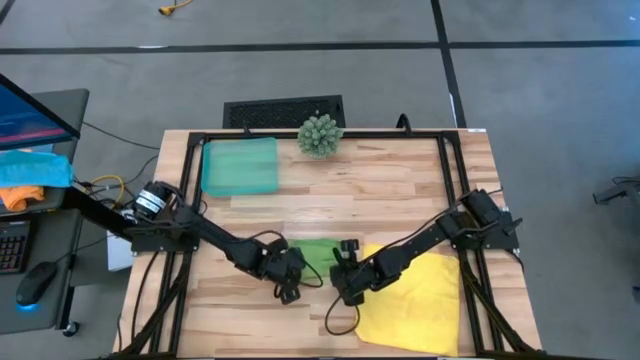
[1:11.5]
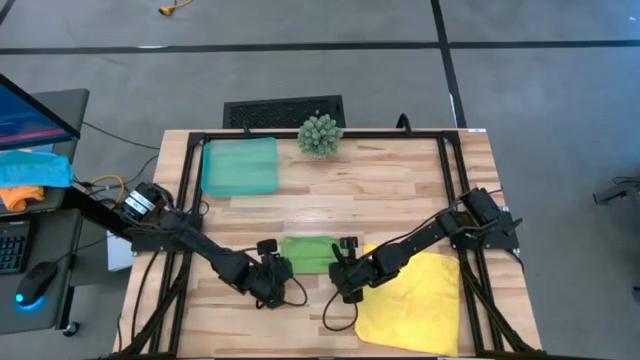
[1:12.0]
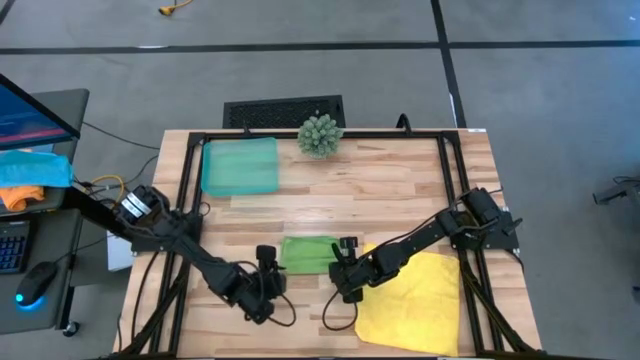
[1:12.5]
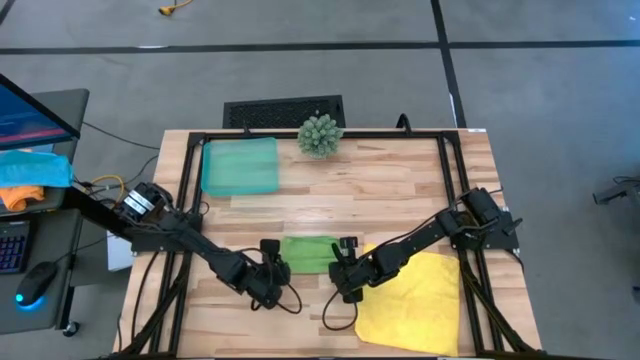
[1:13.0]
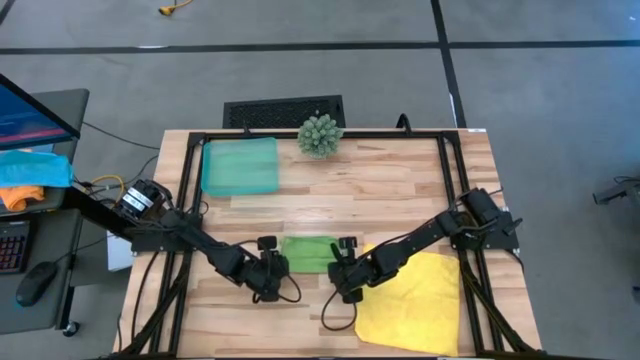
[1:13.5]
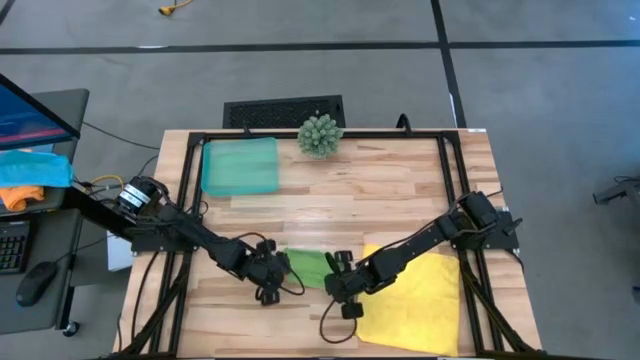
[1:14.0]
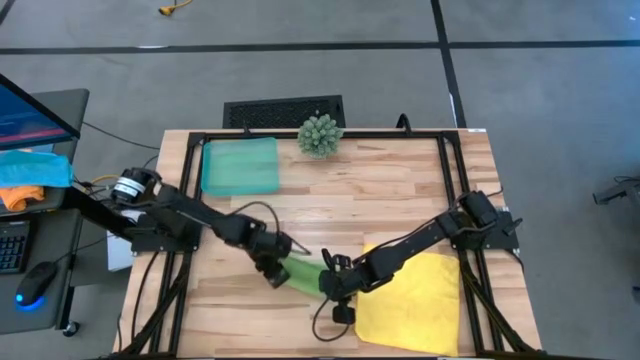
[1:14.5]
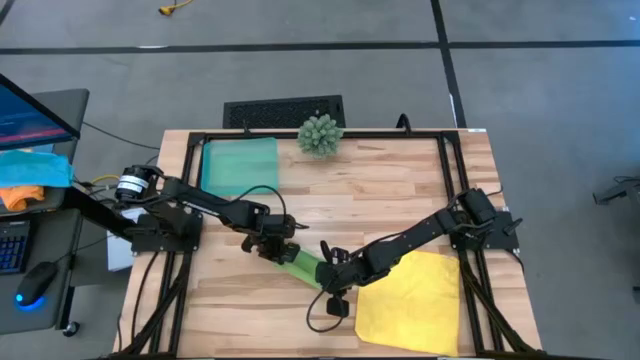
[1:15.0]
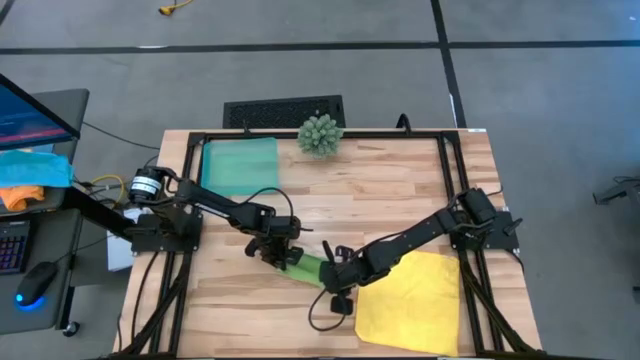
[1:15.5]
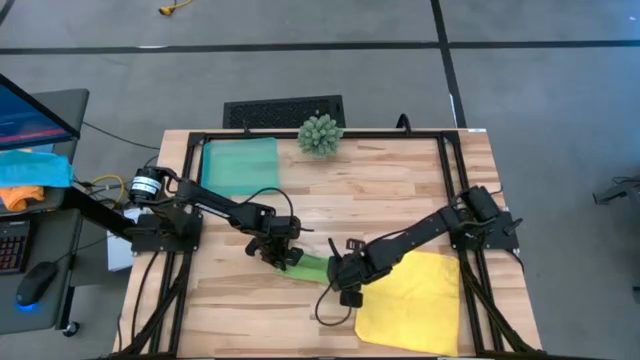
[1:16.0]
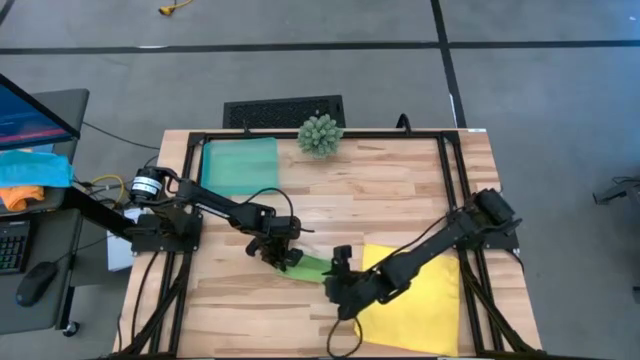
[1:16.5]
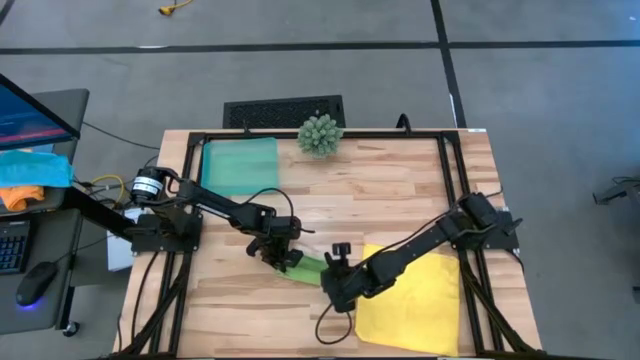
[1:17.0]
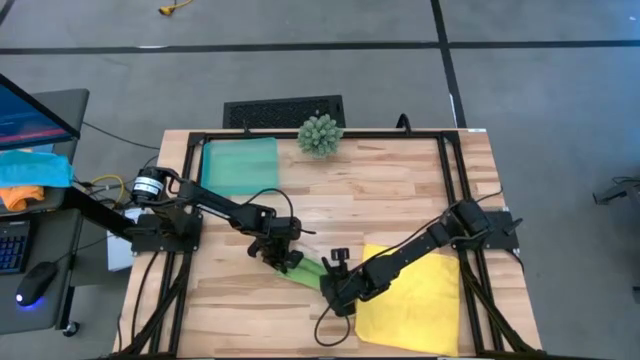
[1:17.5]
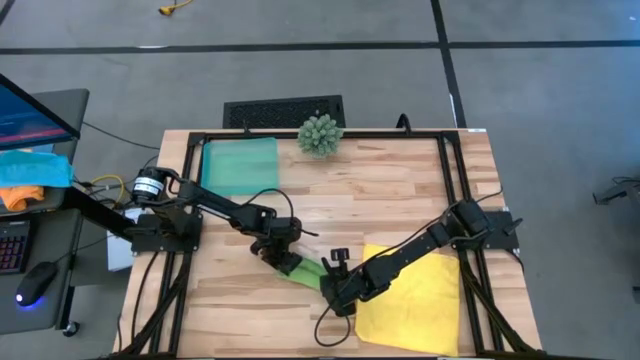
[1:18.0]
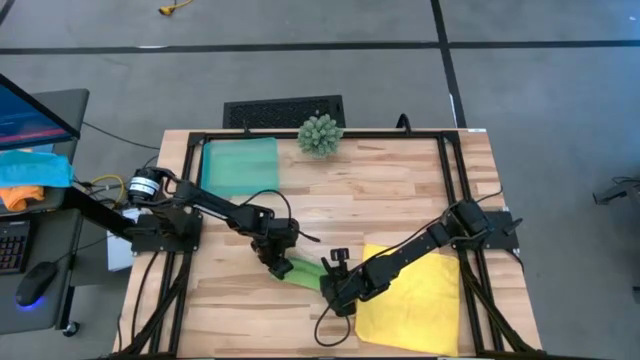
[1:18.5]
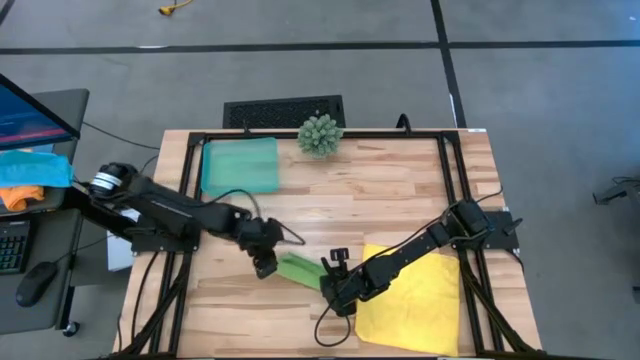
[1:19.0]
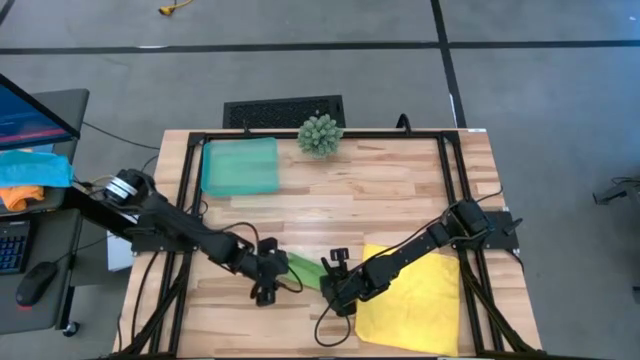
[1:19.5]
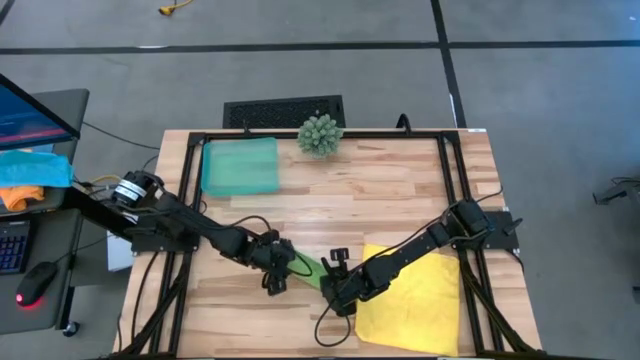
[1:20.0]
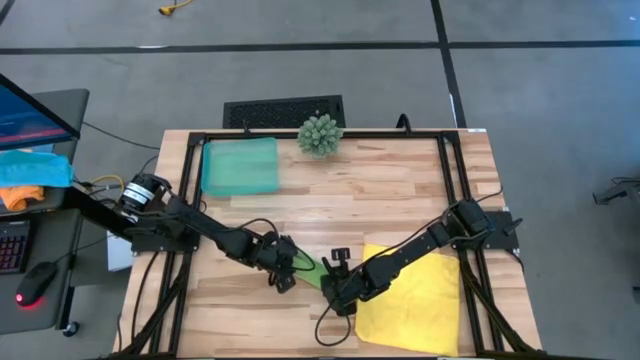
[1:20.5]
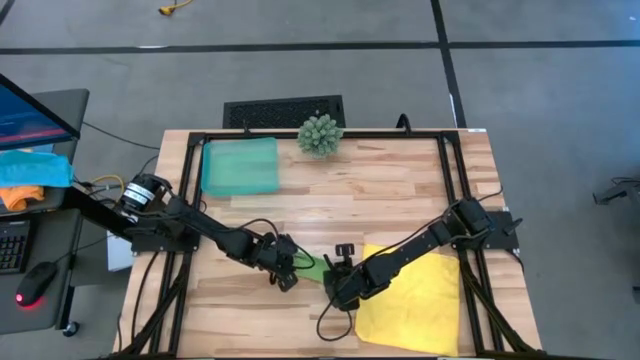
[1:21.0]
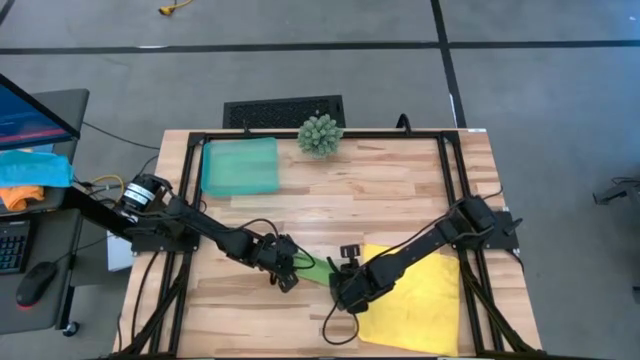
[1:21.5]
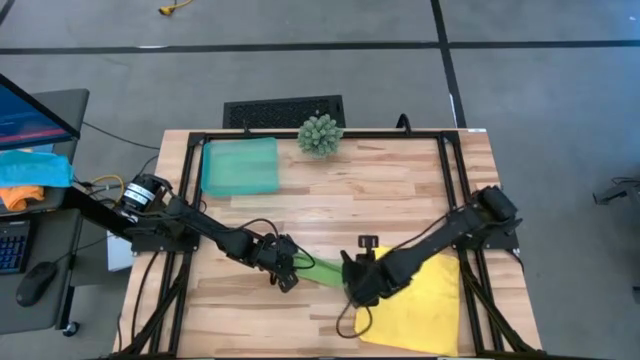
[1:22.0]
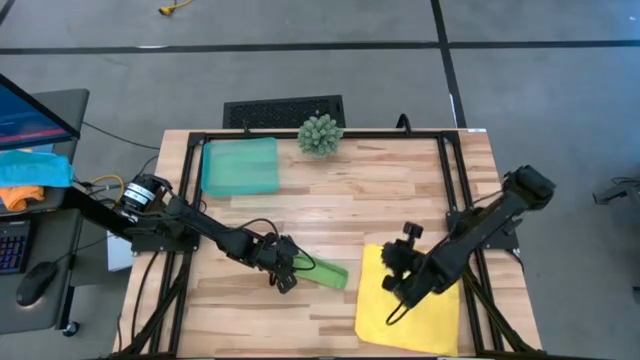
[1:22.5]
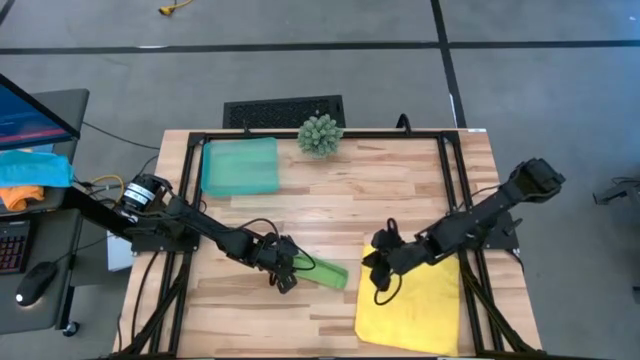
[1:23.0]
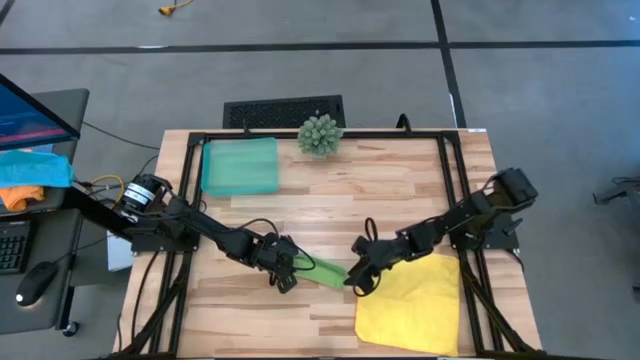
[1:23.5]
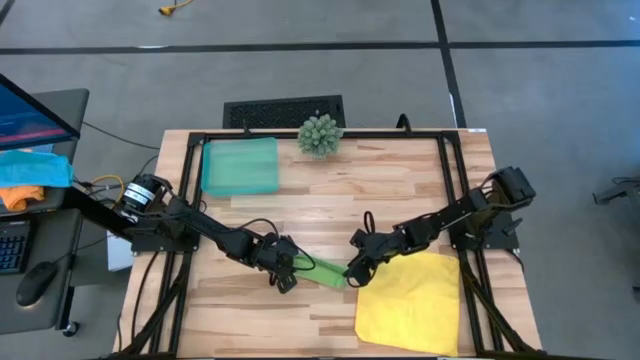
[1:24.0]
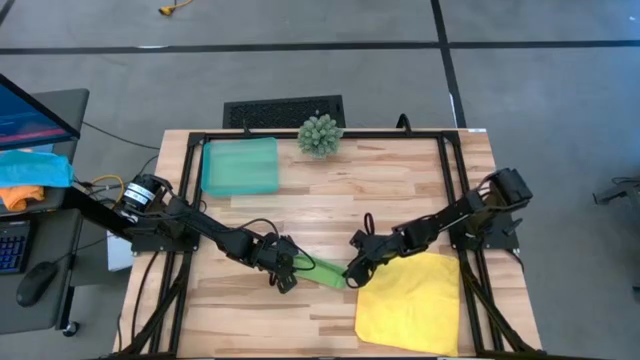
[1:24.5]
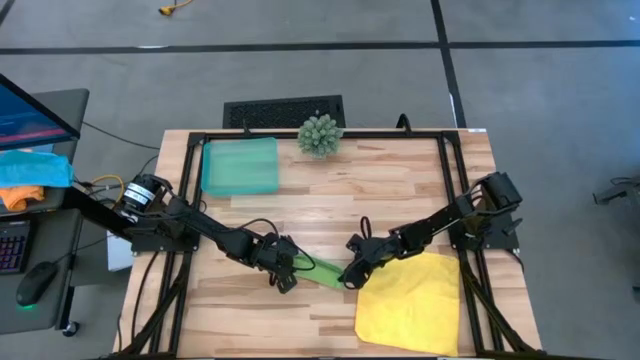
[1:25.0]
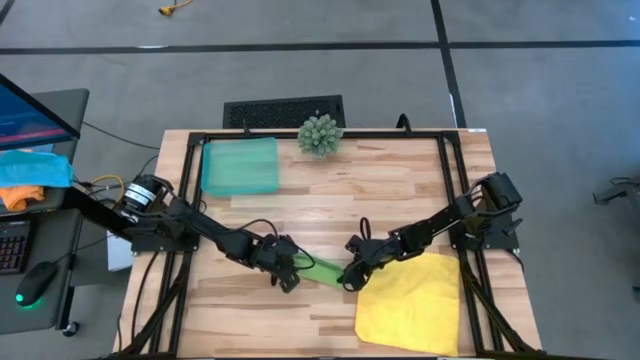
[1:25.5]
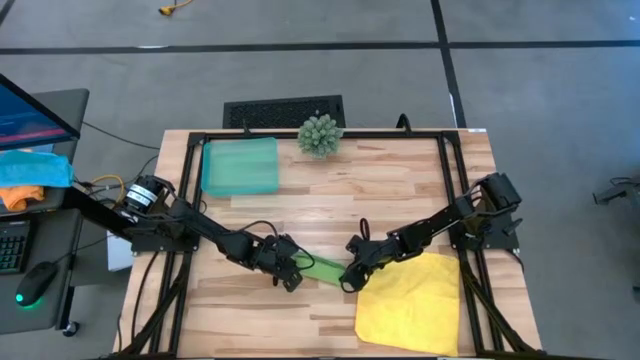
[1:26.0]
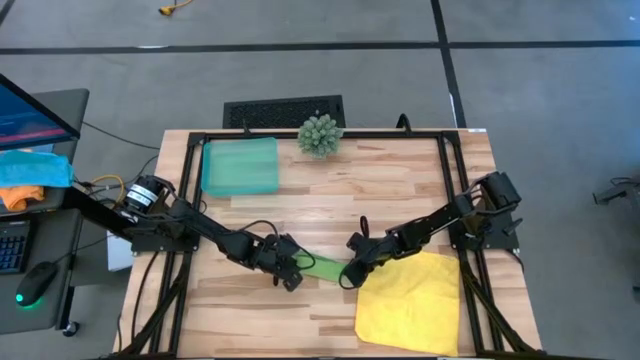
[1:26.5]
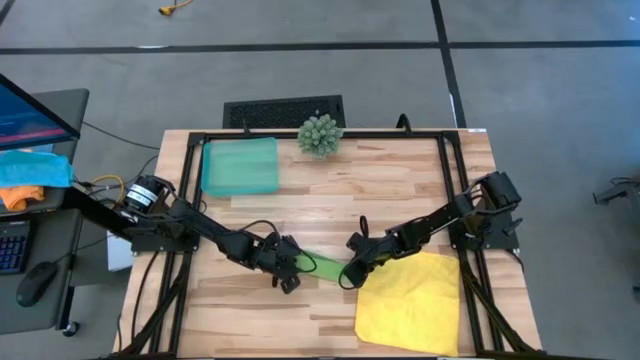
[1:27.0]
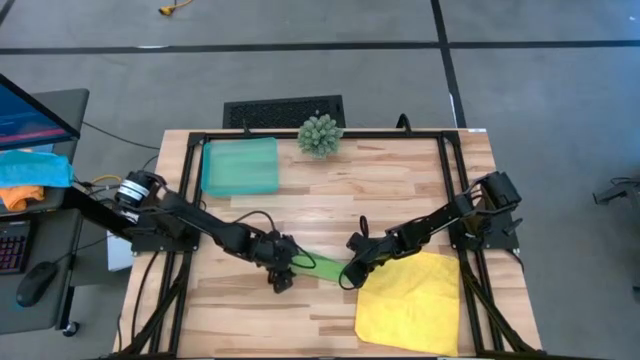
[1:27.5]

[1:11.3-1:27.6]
Task: Roll microfiber towels into tight, uniform cylinder then place into a basket
Roll the green towel

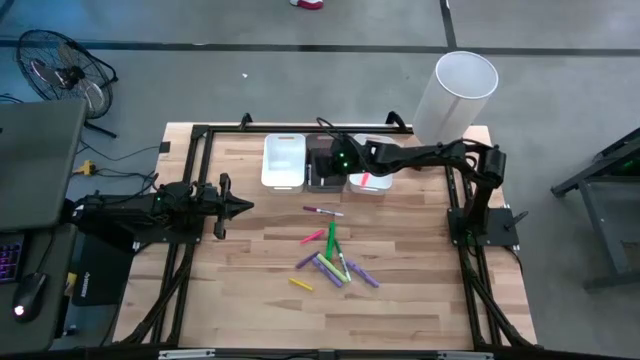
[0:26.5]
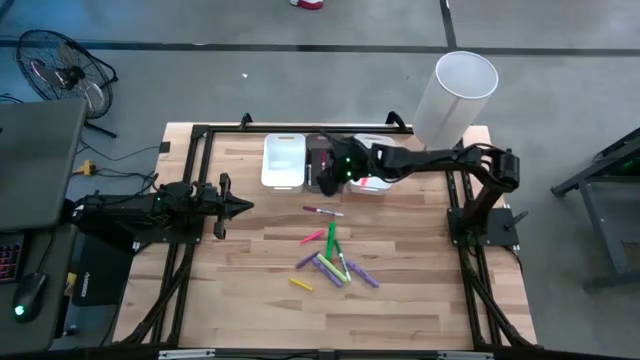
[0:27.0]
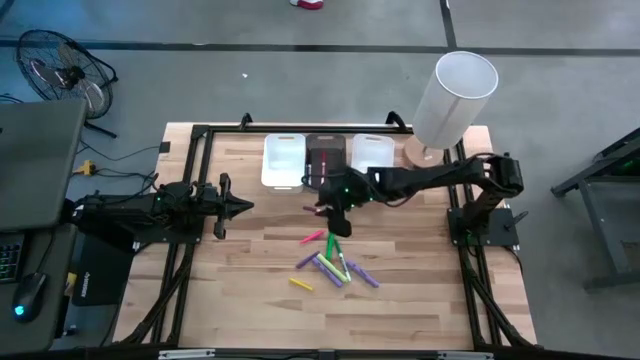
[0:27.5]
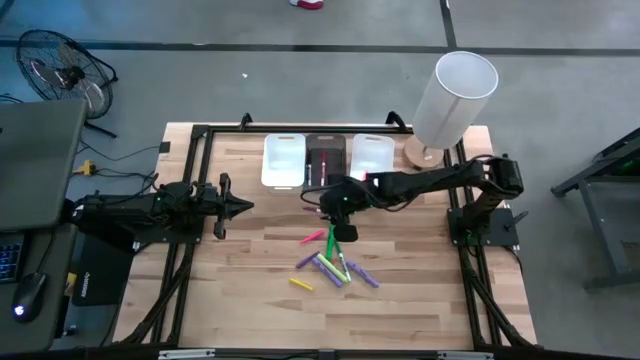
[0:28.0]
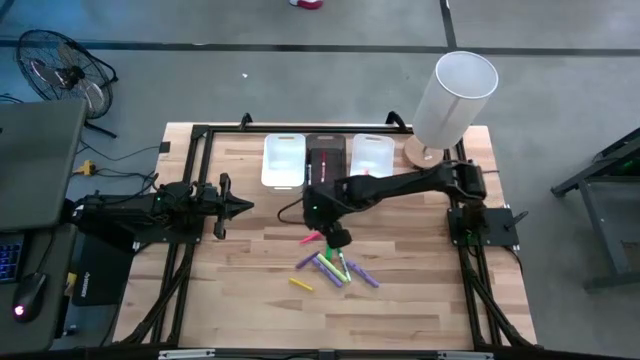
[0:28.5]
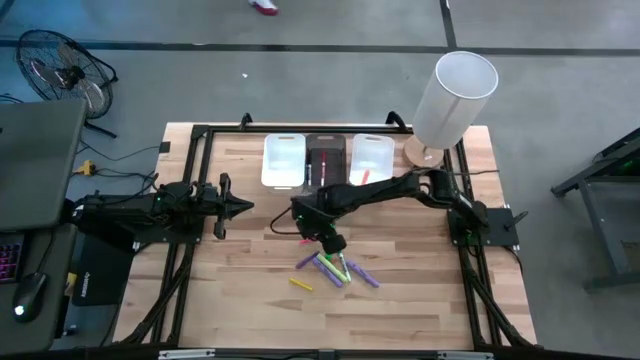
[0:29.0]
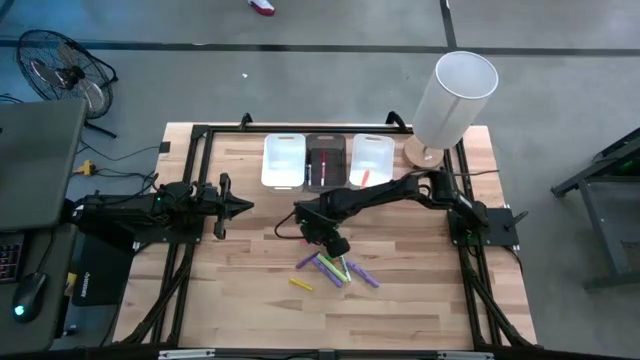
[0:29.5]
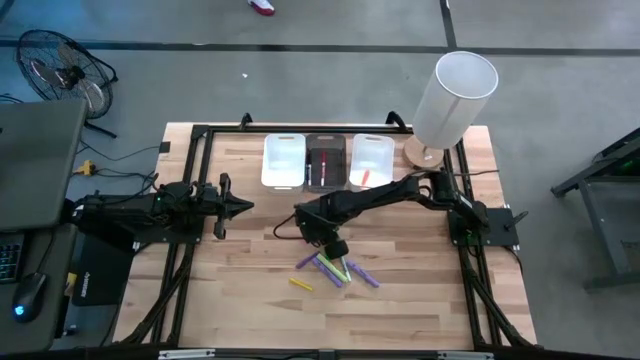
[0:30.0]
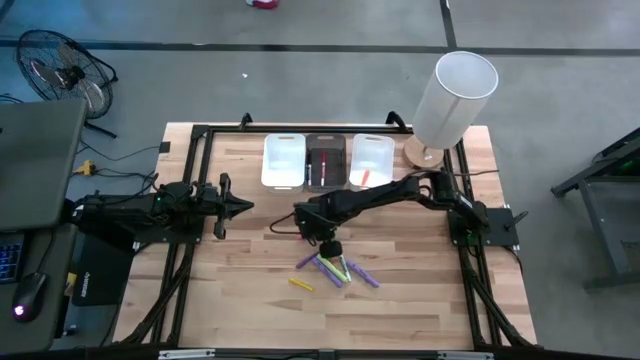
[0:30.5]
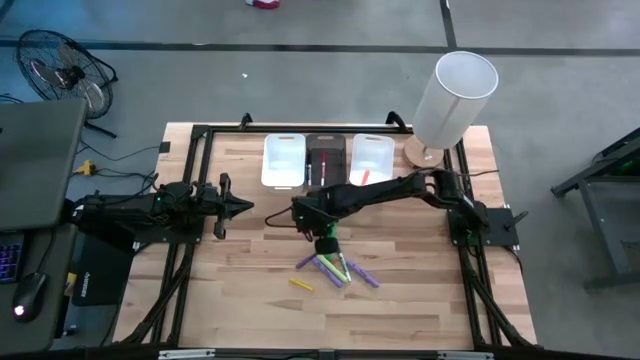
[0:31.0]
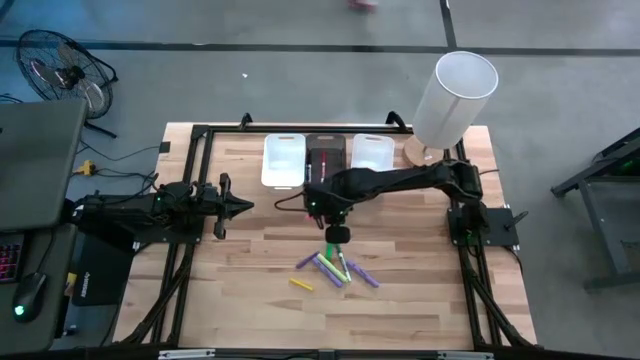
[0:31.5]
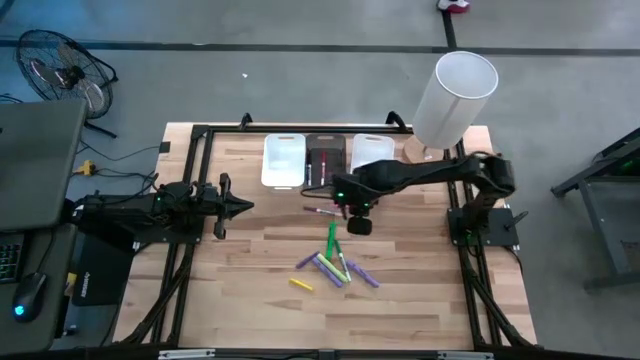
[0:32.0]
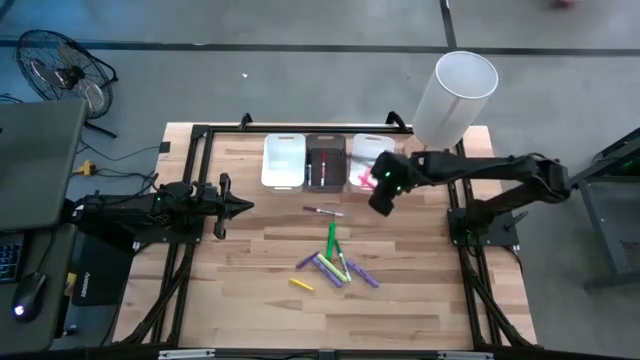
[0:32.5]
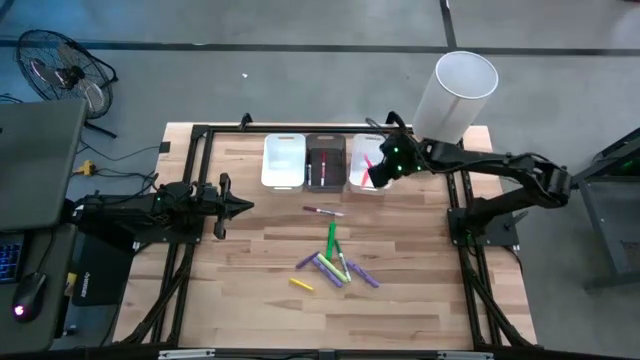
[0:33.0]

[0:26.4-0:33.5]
Task: Pick & Place Markers
Put the pink pen into the right white bin
